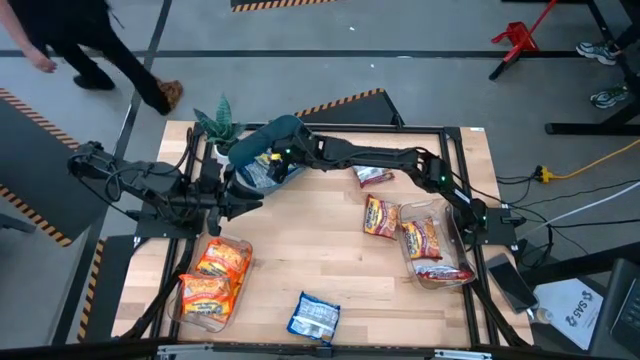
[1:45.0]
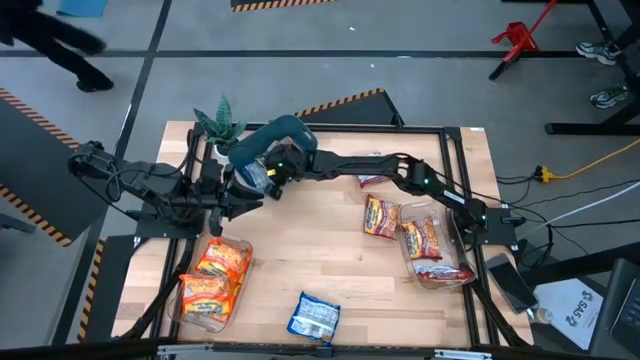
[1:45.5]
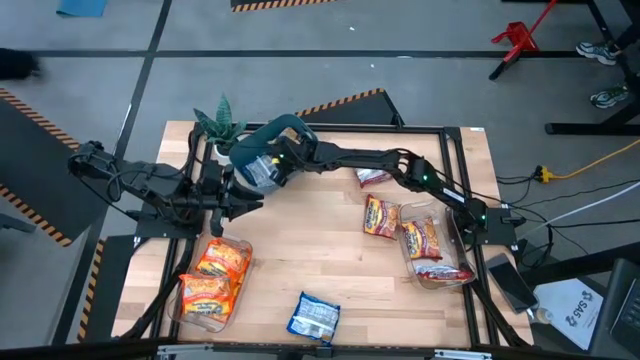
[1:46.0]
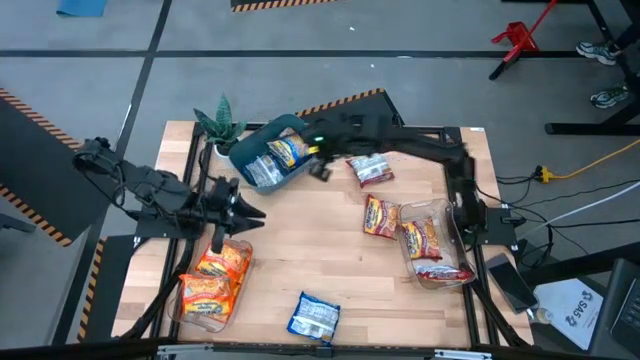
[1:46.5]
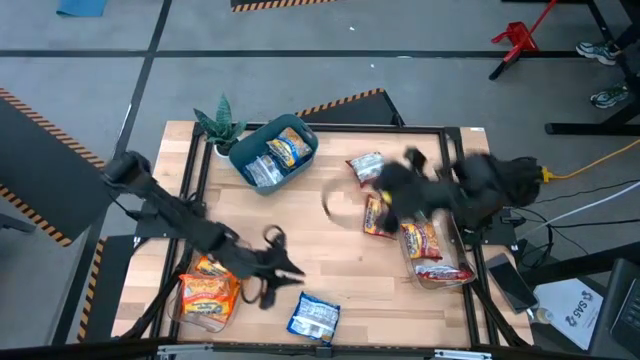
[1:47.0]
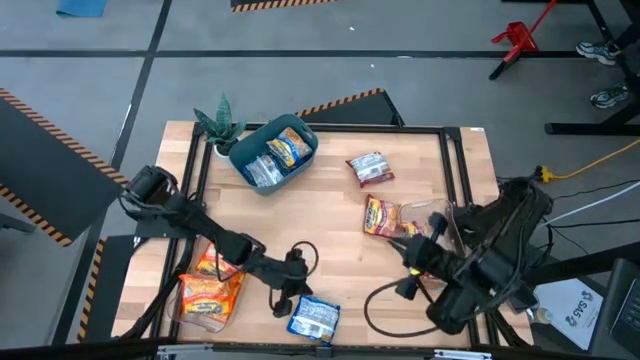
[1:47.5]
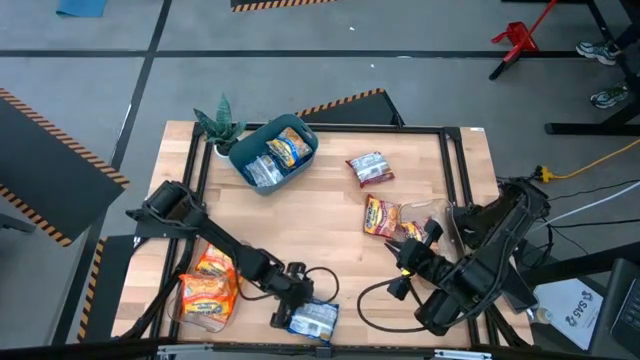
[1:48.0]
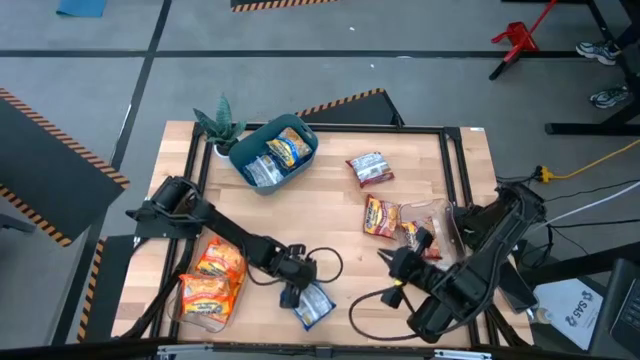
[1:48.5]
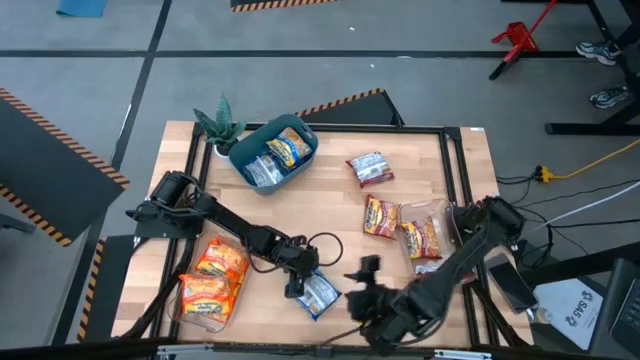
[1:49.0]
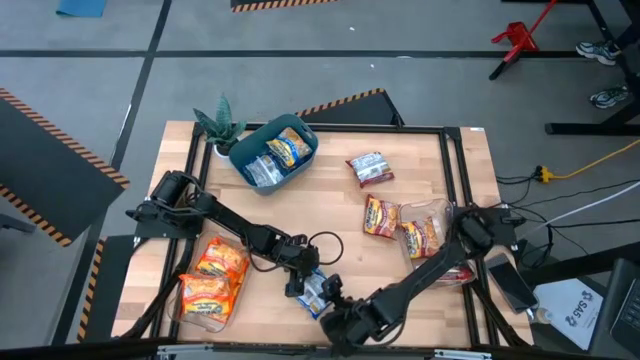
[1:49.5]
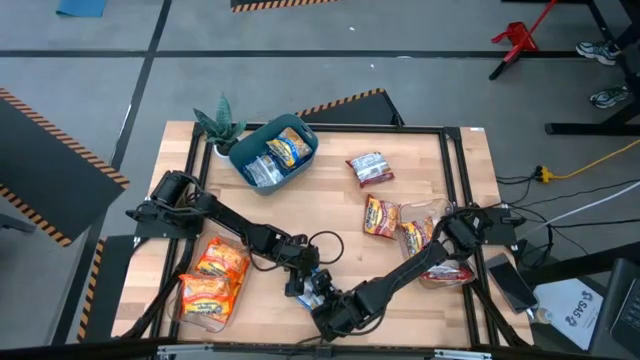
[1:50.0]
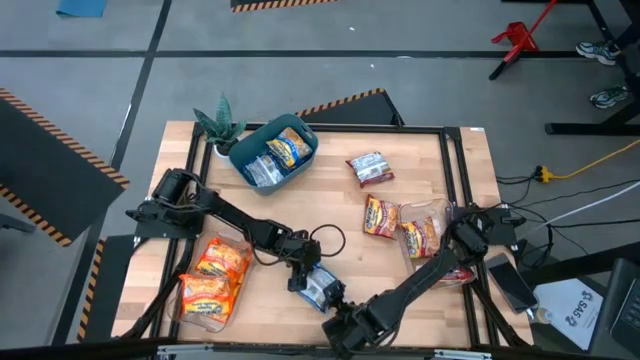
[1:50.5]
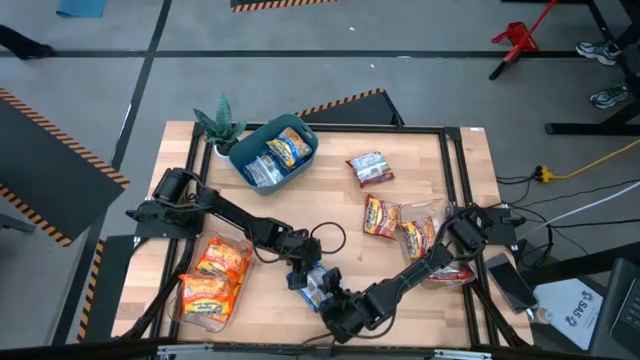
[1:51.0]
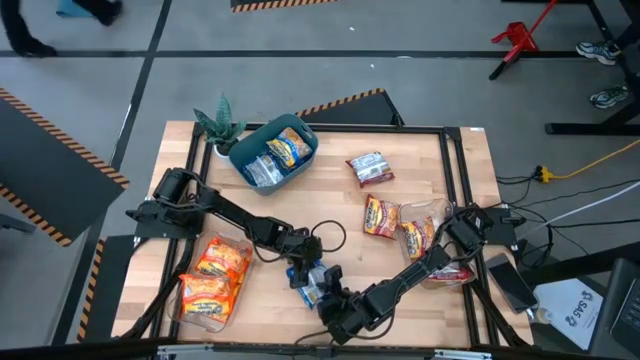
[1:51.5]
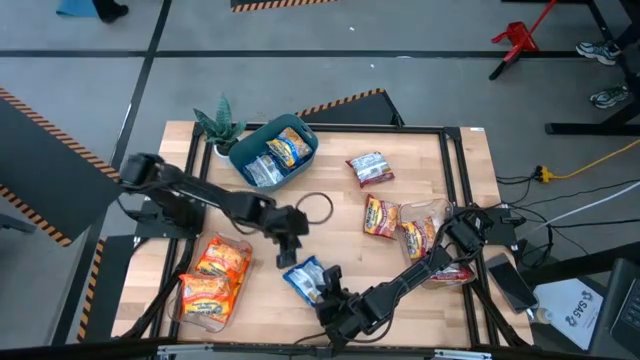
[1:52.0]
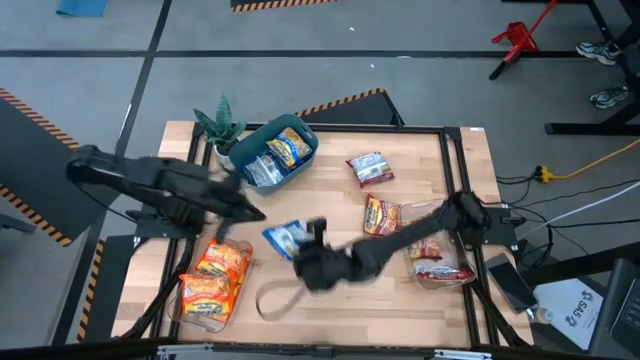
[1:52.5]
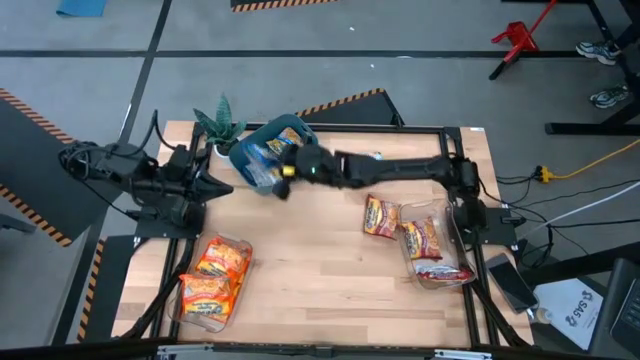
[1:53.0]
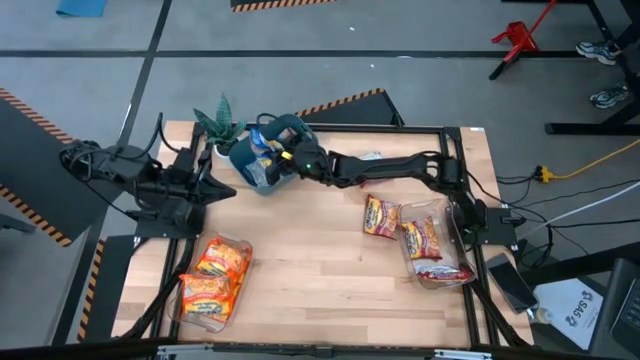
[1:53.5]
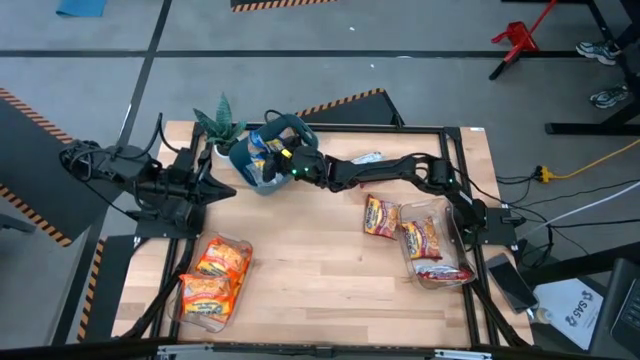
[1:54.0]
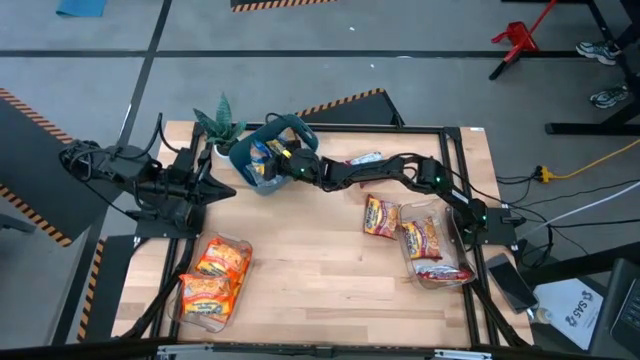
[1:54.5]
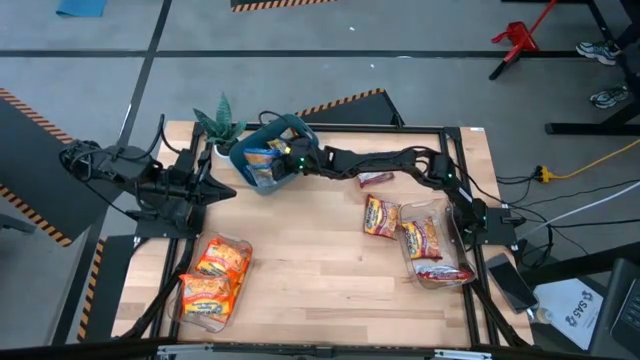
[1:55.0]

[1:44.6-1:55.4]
Task: Sort Maruchan noodles
Put the blue noodle pack into the blue bin

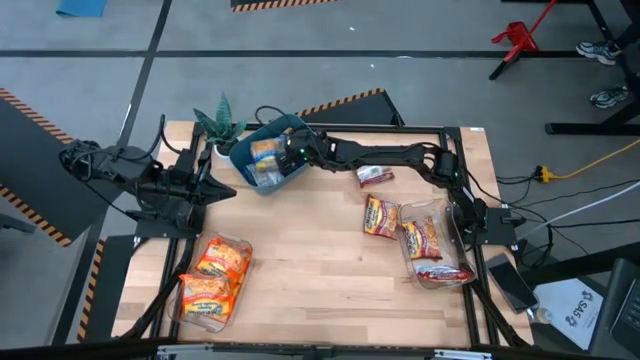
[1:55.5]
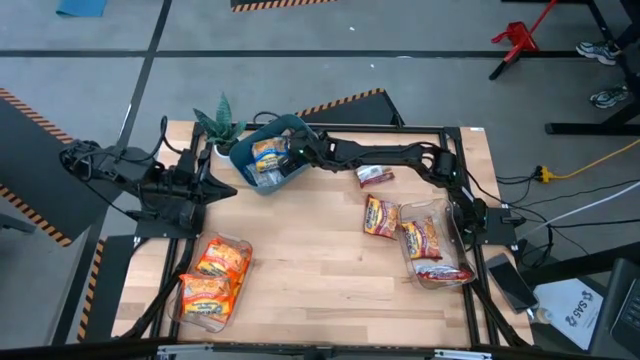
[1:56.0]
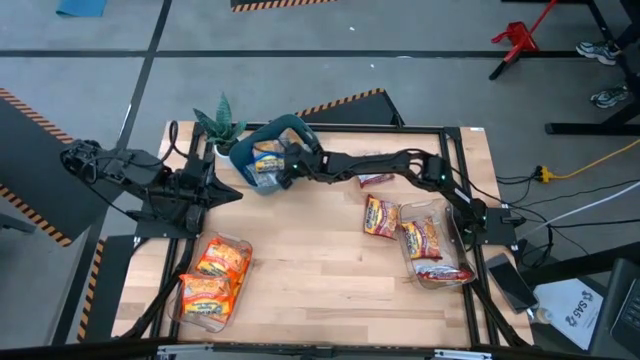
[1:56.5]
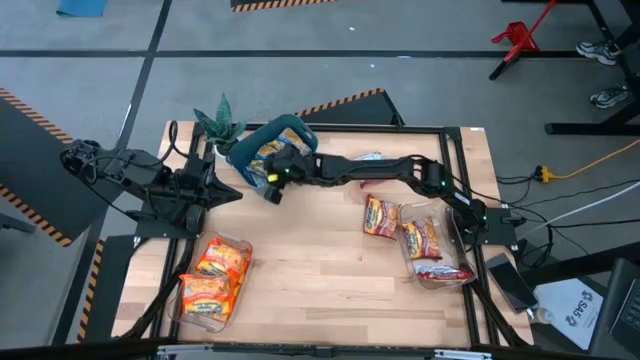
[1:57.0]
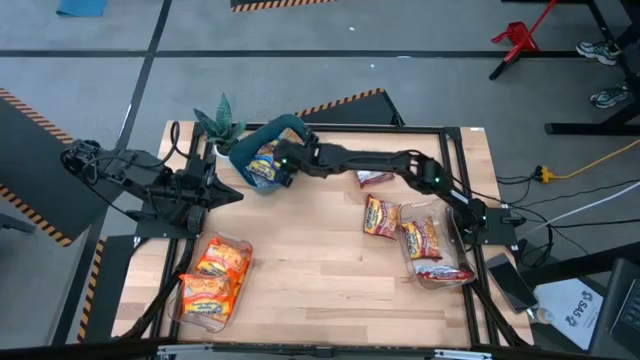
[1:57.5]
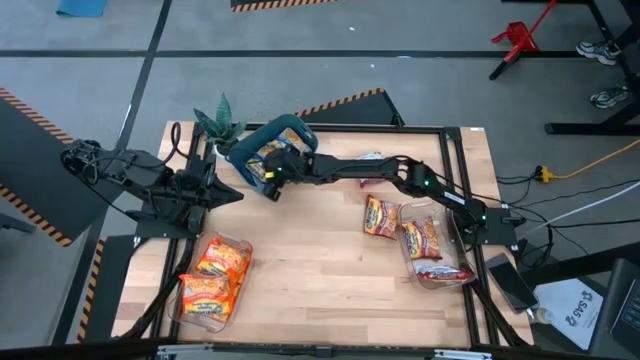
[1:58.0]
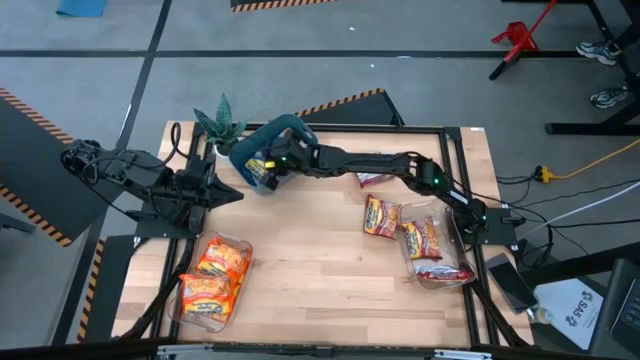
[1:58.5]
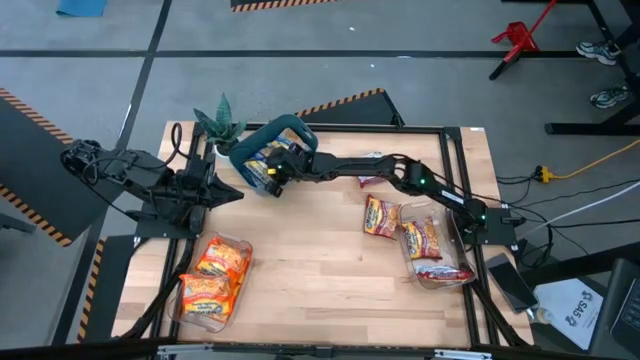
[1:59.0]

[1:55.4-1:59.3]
Adjust the blue noodle pack

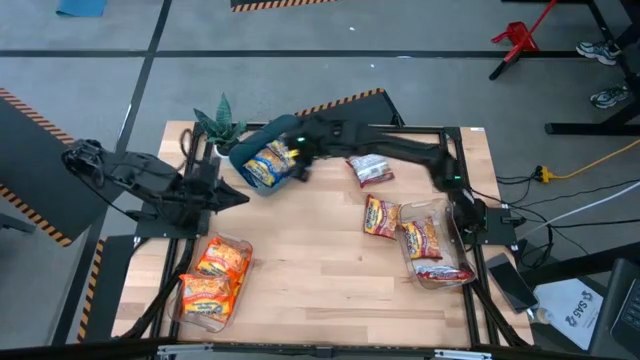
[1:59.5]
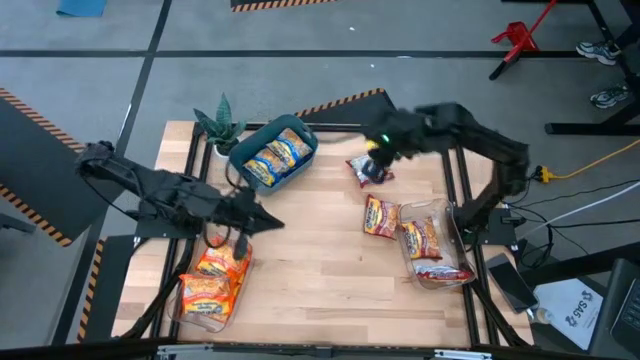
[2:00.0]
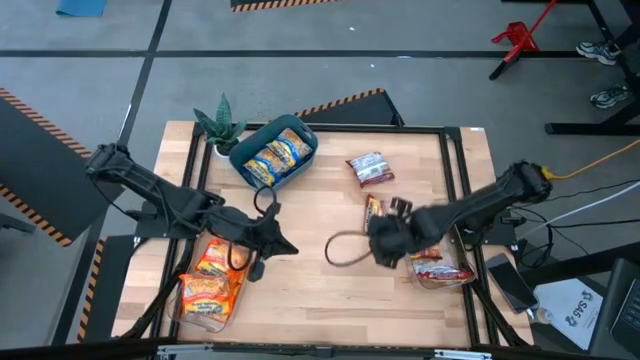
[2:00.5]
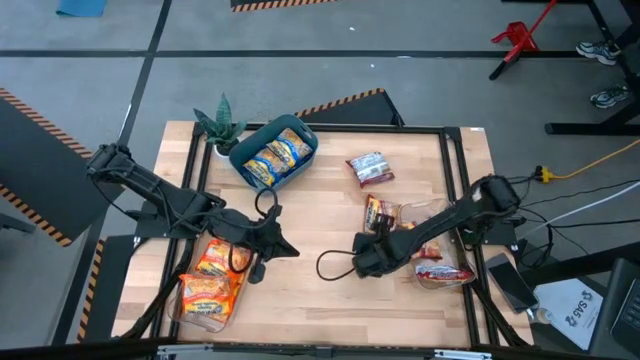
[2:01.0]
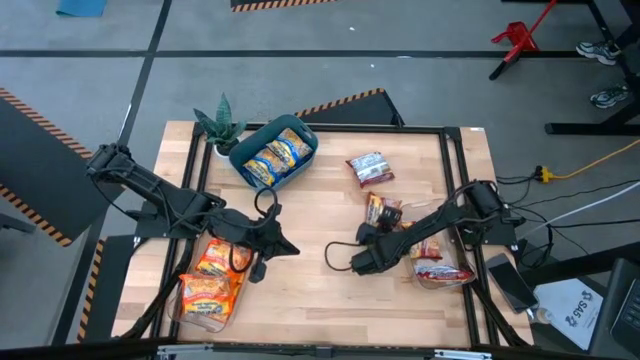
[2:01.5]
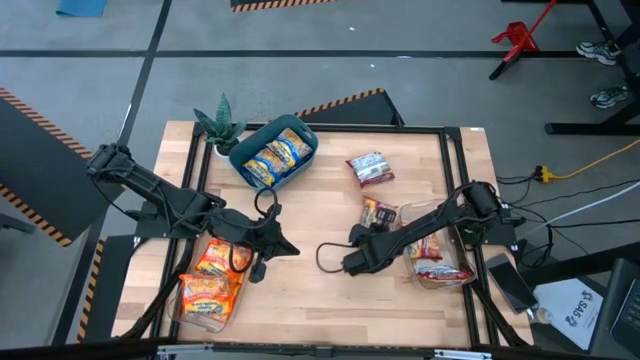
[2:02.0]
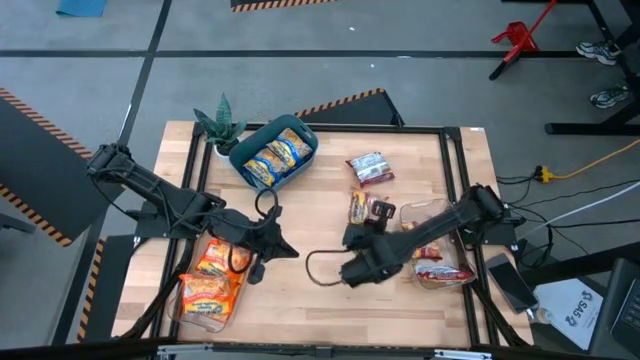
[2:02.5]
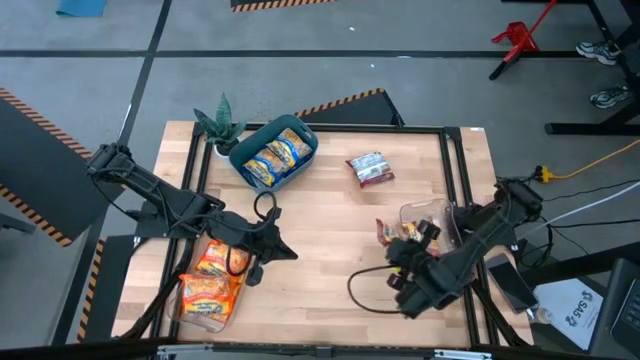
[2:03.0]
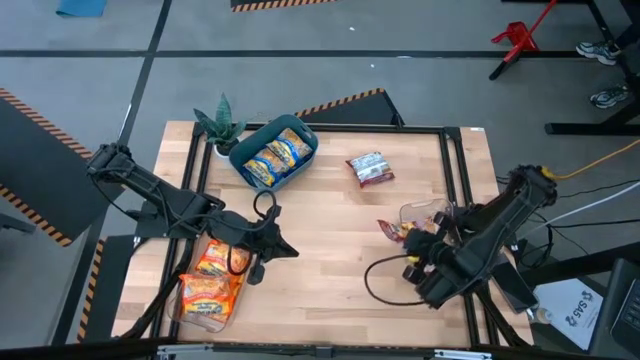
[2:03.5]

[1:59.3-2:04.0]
Put the red noodle pack into the right transparent bin
